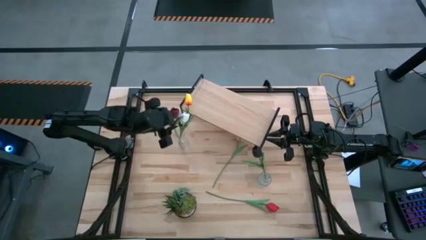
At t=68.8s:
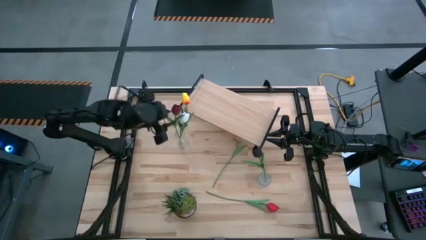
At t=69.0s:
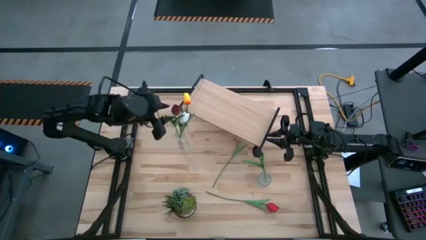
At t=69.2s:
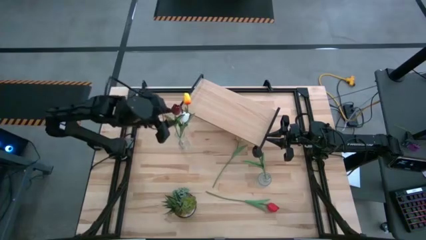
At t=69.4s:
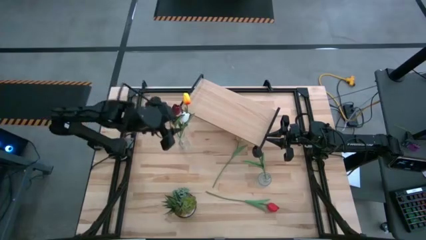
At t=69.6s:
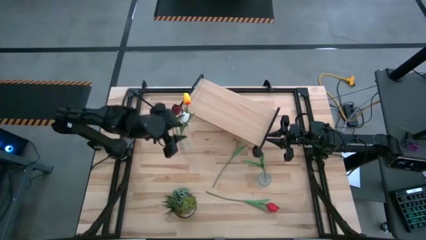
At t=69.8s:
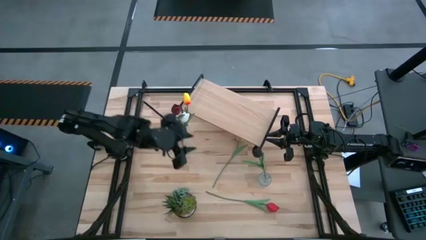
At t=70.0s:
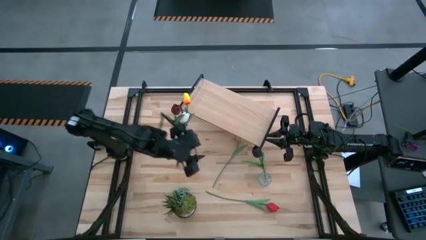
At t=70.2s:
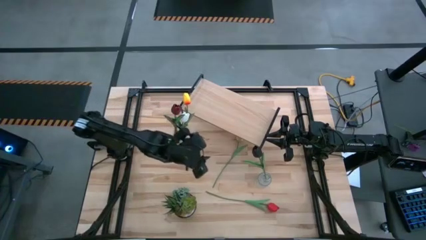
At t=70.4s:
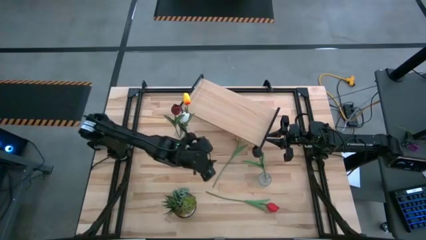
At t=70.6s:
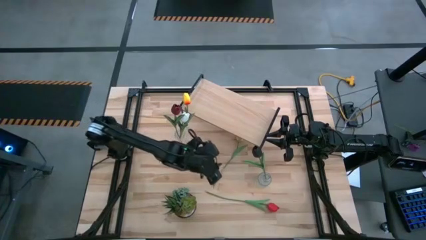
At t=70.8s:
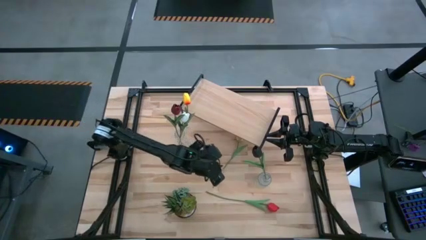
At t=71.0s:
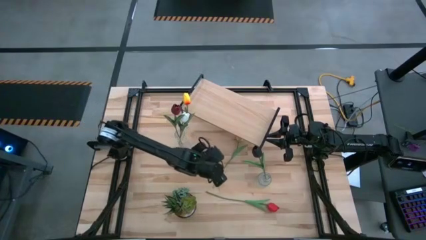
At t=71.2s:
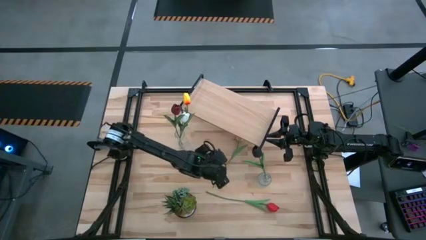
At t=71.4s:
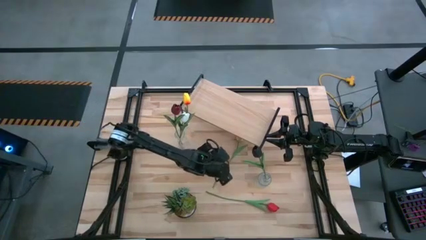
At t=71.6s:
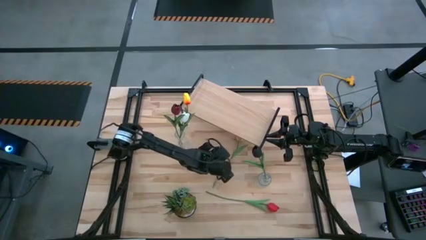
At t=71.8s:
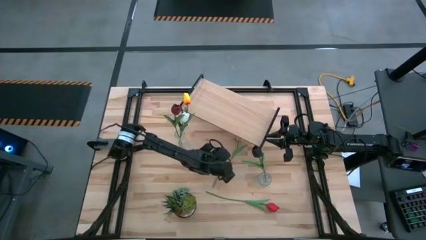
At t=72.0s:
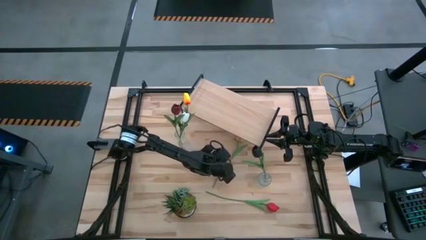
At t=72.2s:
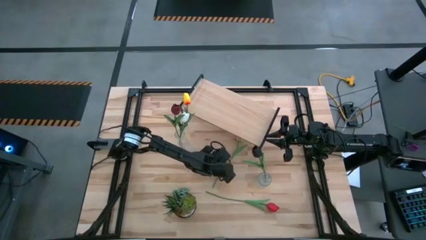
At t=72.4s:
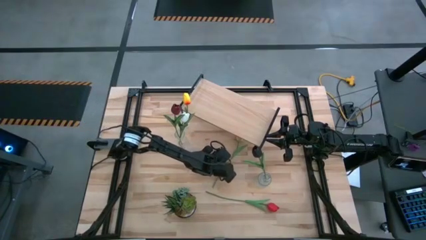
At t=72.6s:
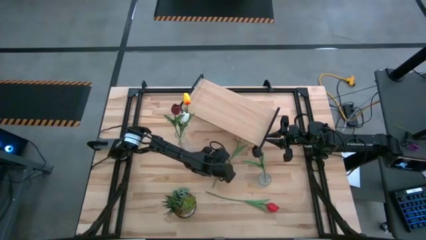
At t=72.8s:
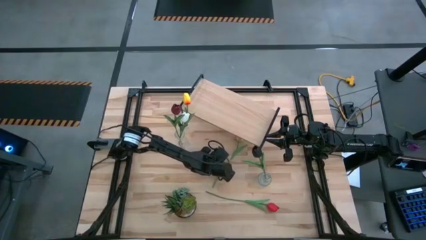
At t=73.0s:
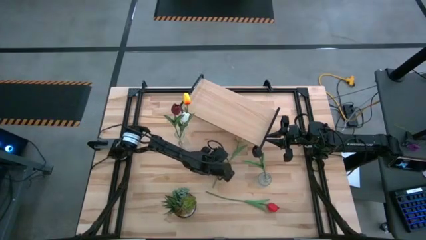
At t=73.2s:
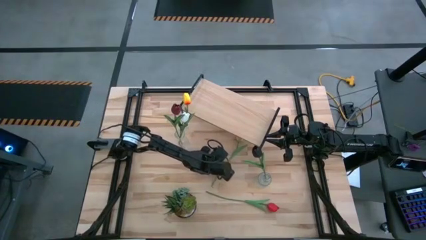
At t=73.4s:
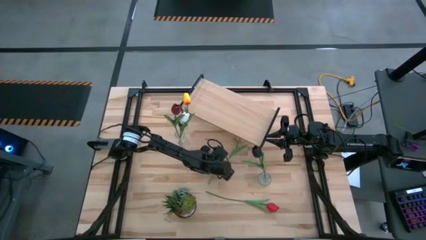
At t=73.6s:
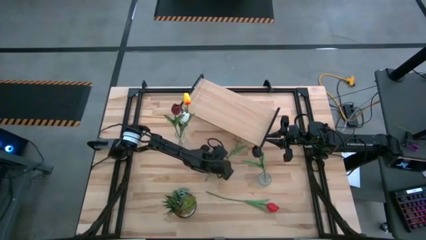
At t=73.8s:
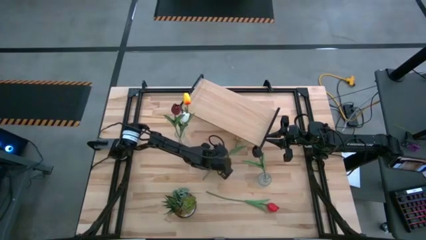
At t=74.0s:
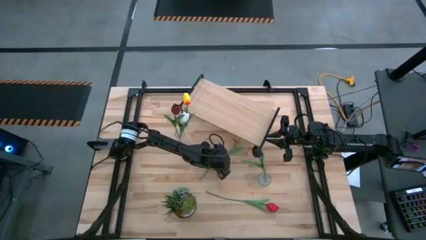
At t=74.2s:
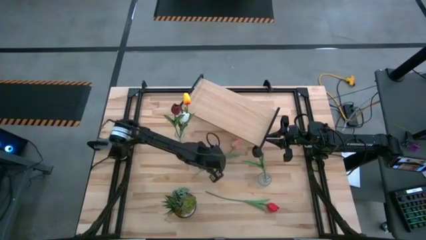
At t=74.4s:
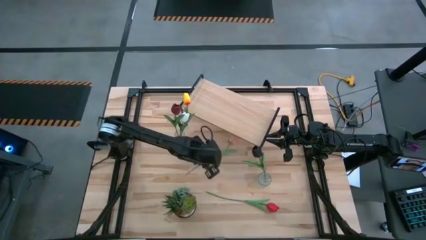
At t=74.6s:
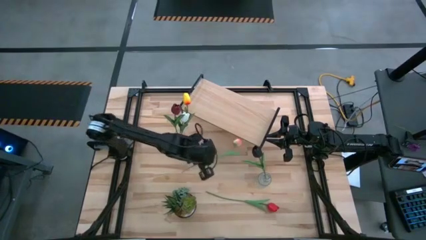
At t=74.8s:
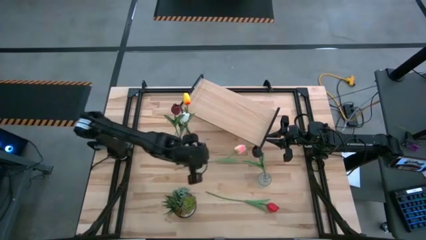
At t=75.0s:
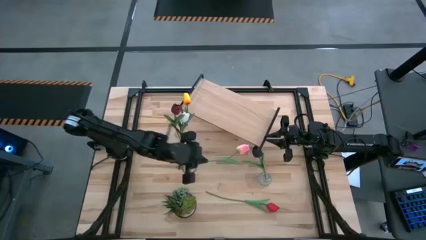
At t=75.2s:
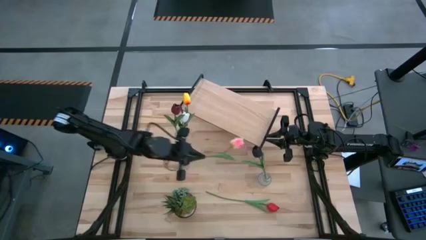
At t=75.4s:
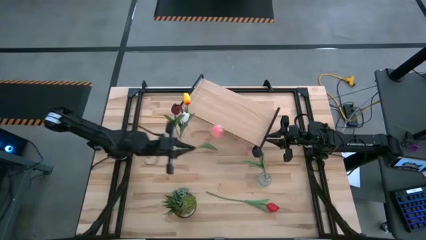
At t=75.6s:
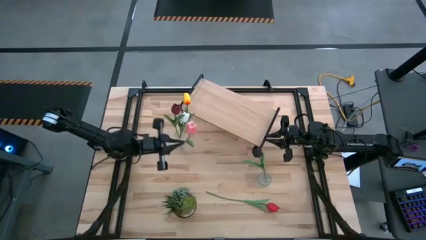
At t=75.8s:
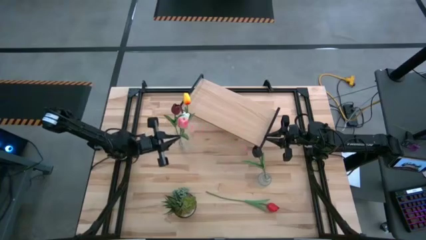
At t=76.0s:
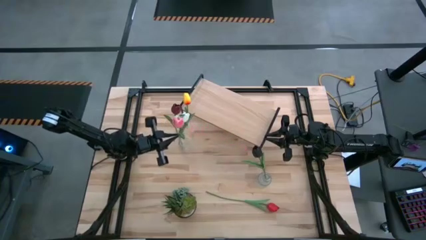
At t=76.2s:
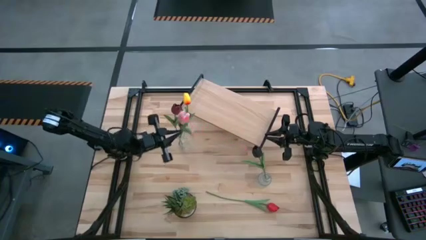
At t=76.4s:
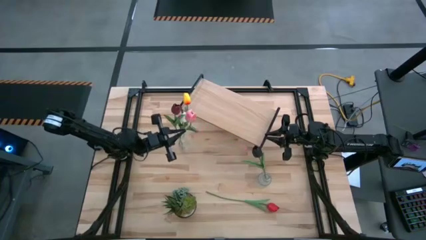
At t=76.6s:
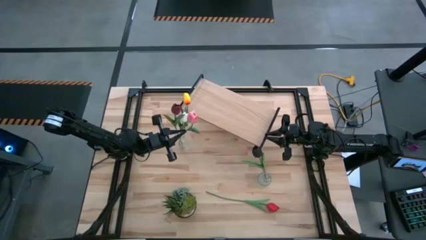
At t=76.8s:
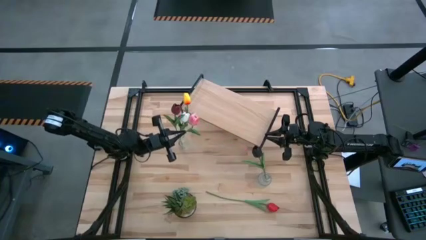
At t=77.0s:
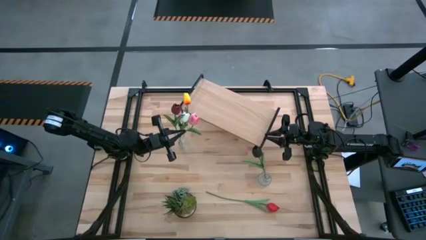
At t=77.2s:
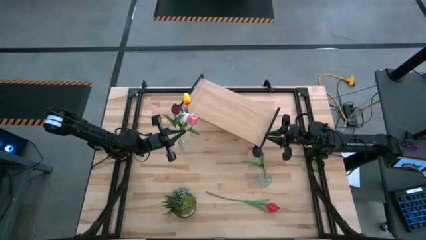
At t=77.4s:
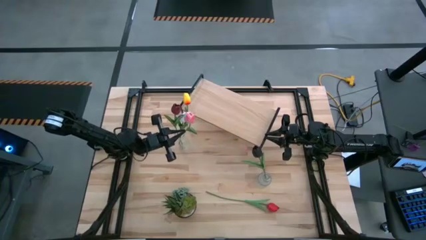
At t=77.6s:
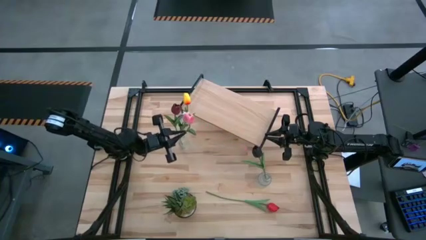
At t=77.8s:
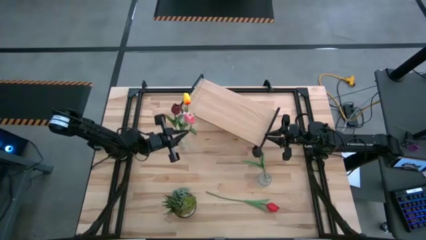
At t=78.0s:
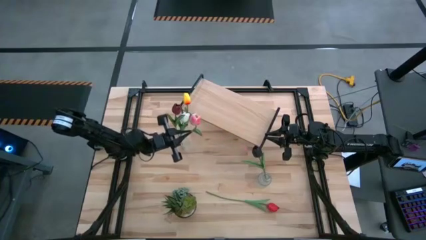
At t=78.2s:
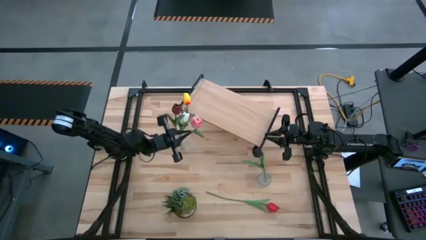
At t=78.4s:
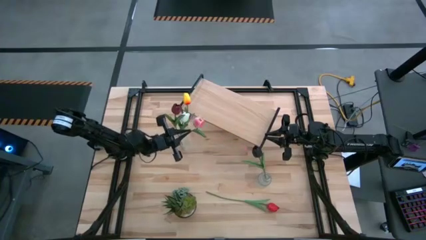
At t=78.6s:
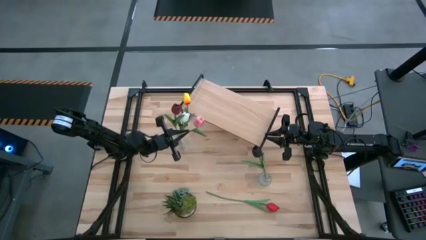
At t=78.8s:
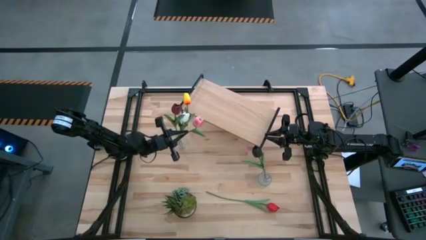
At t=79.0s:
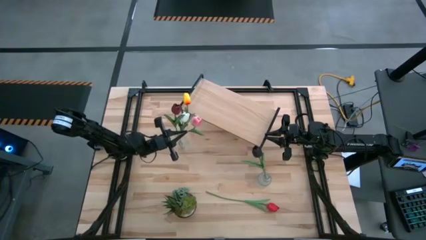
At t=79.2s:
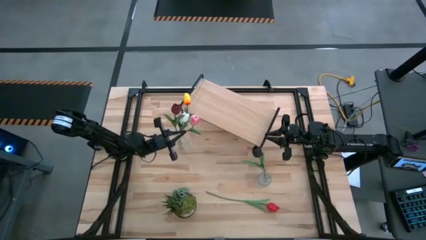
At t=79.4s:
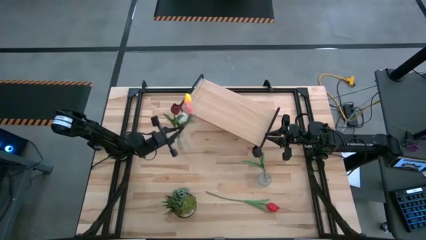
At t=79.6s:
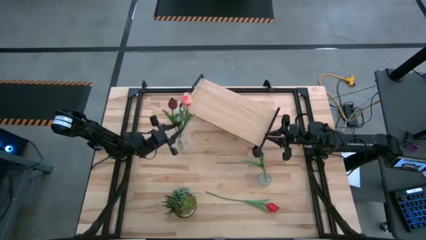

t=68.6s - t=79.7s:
Task: Pick and place flowers into a vace then onto a shelf
Put the pink tulip into the left transparent vase

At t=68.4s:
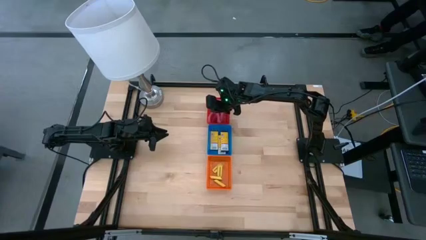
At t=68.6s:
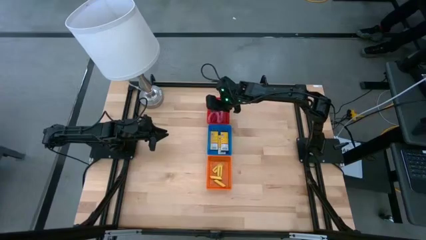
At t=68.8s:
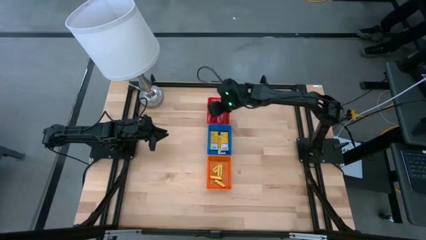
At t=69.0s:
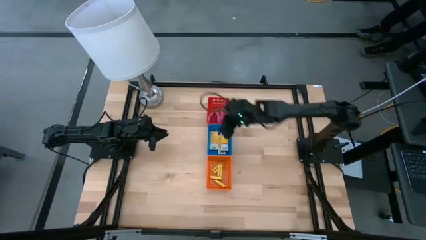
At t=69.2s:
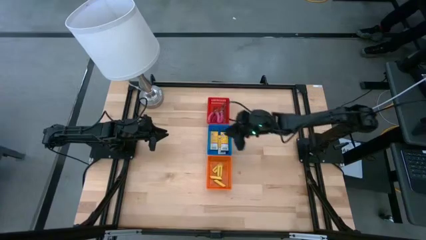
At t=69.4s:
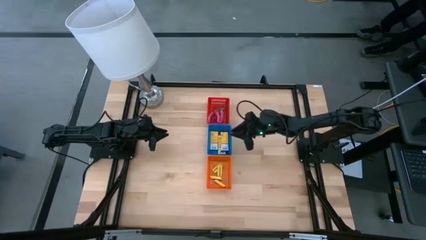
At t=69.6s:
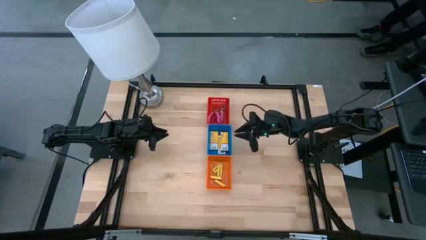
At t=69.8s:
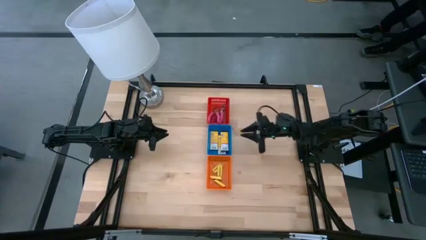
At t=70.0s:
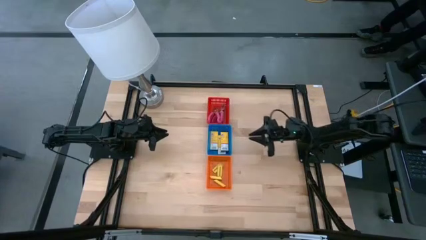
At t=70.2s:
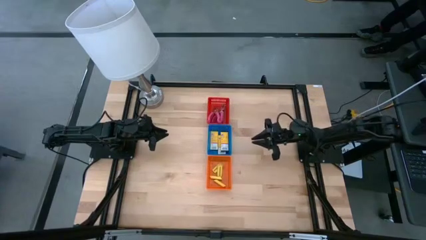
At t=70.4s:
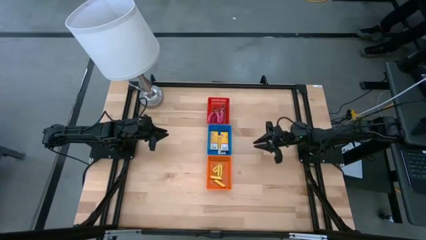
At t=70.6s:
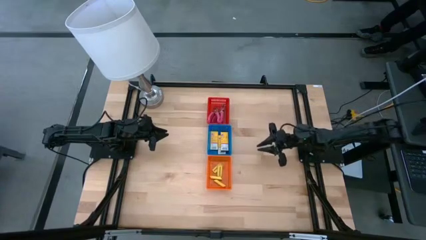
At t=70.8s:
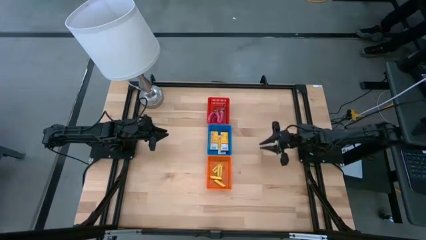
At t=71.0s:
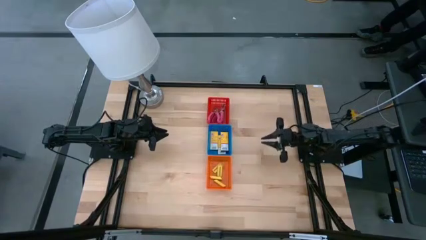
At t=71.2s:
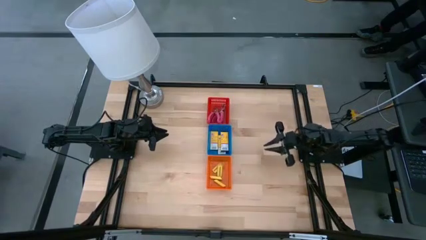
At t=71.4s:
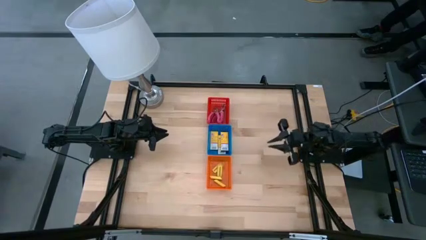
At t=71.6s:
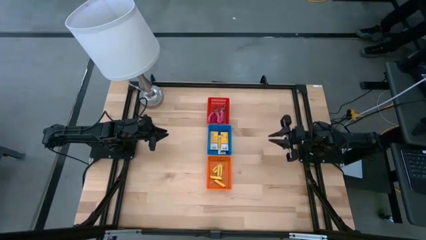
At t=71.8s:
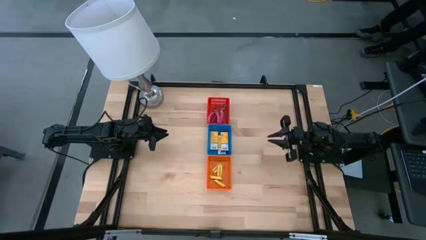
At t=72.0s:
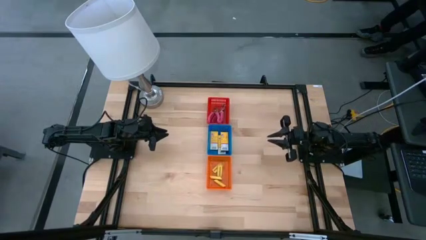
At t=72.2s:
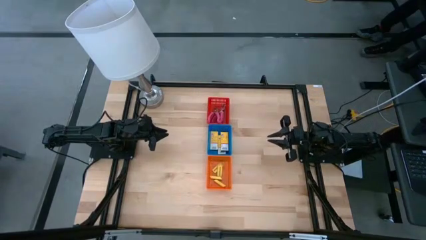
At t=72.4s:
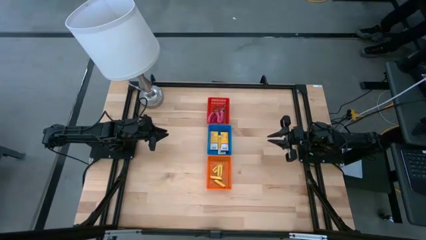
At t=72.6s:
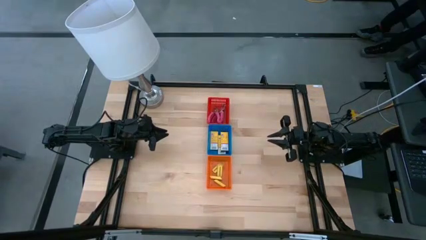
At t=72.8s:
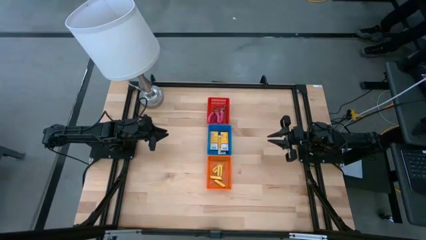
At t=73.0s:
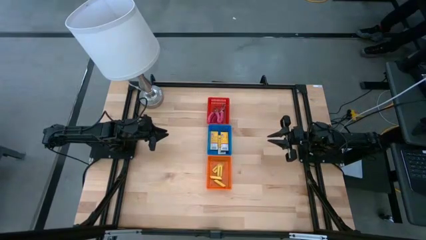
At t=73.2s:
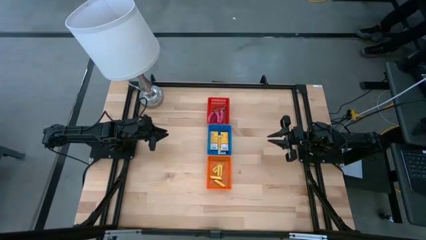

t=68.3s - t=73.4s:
Task: Pick & Place School Supplies
Return to Home Position
